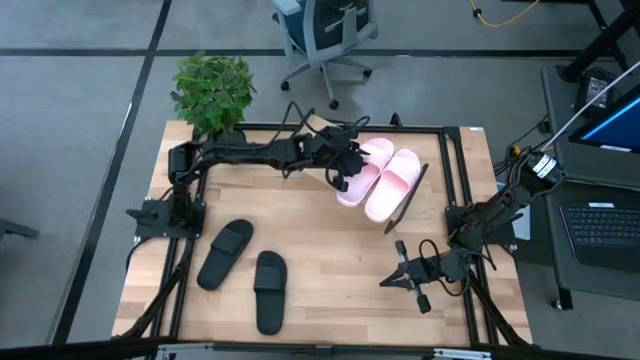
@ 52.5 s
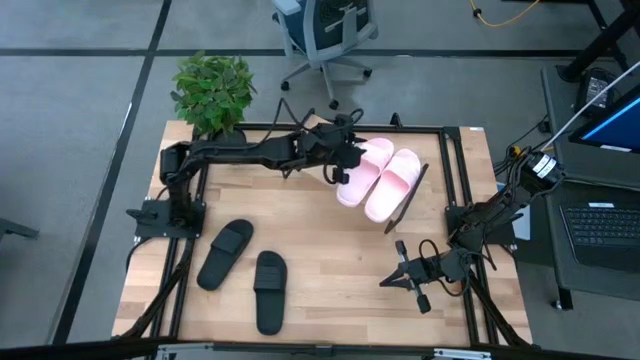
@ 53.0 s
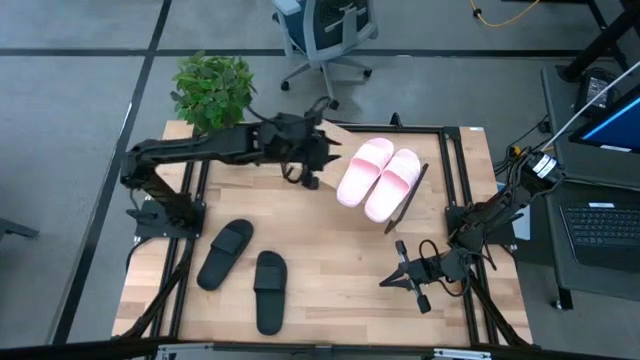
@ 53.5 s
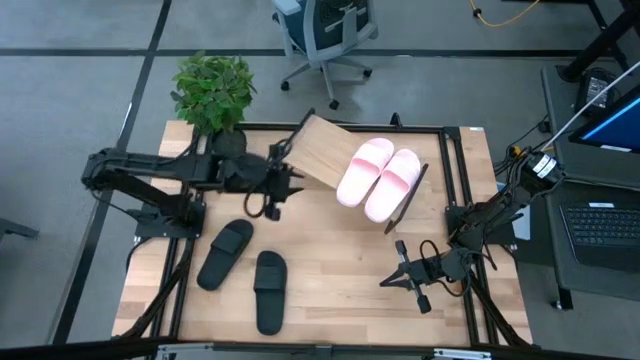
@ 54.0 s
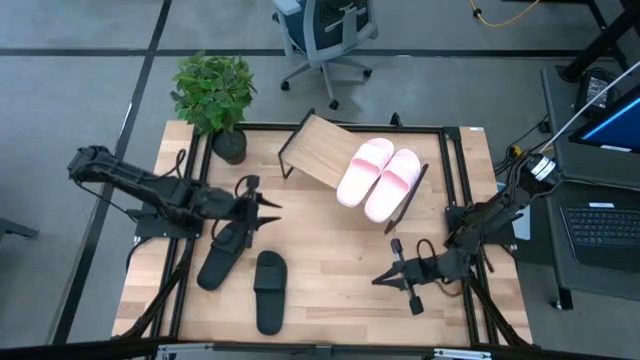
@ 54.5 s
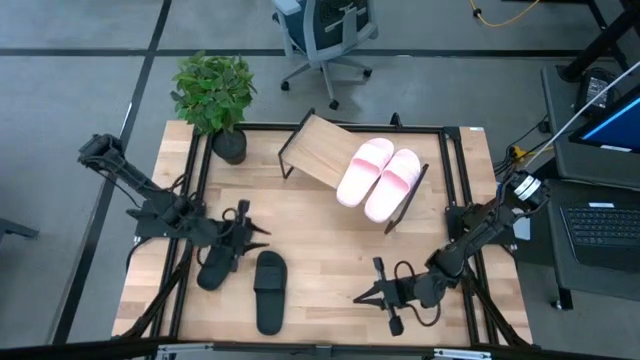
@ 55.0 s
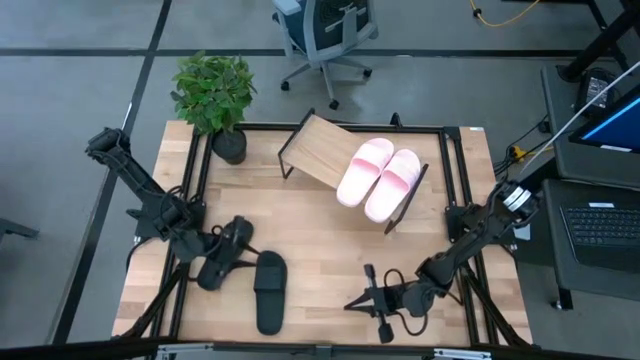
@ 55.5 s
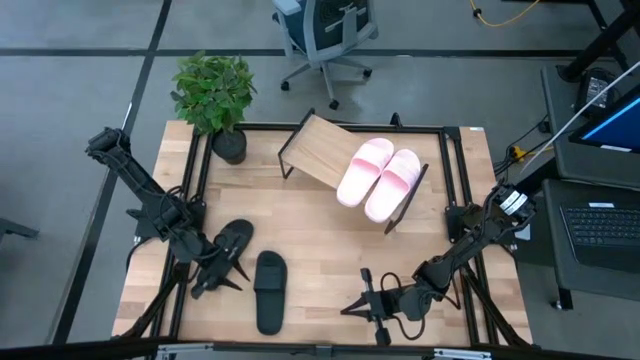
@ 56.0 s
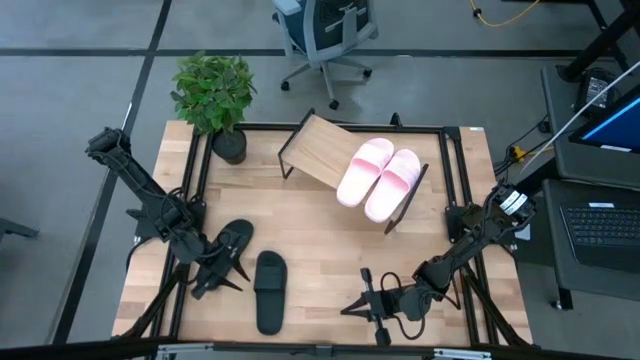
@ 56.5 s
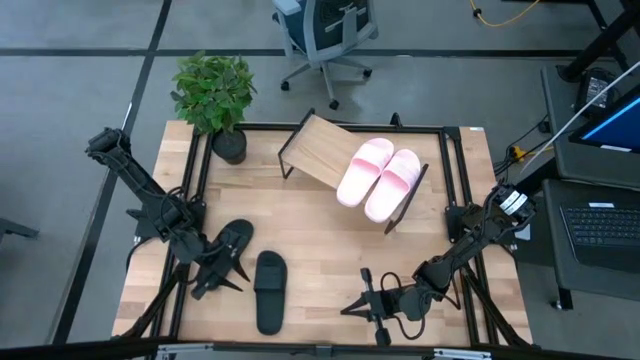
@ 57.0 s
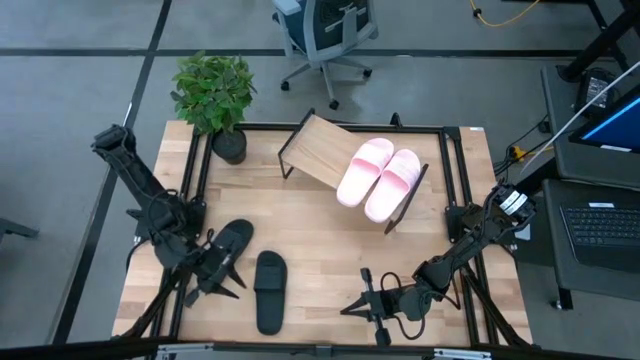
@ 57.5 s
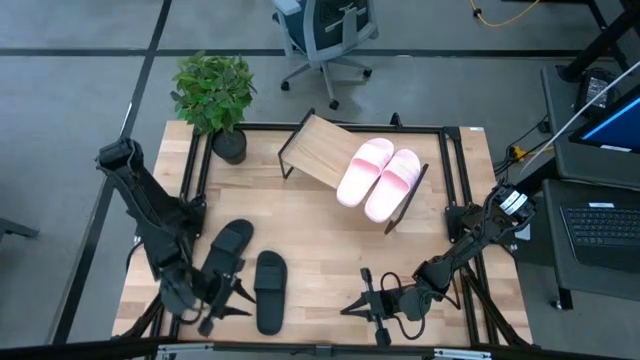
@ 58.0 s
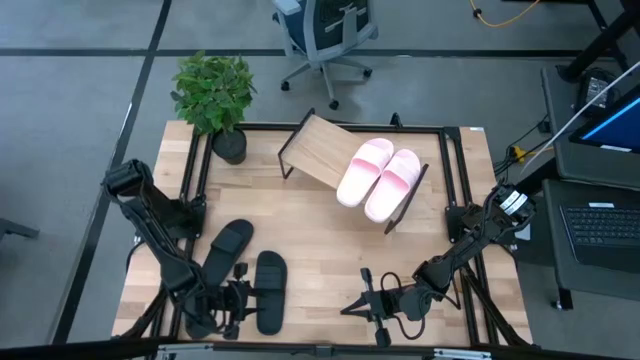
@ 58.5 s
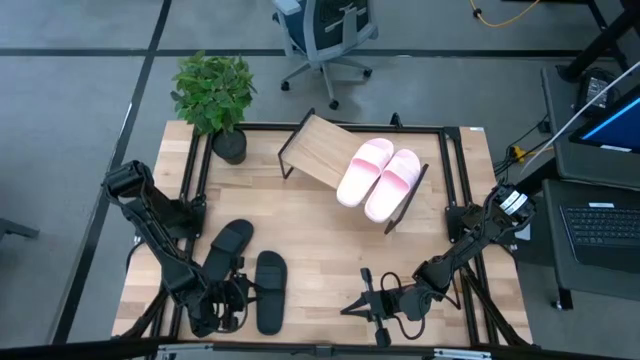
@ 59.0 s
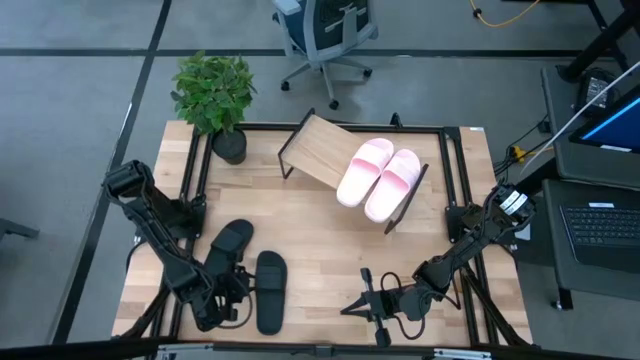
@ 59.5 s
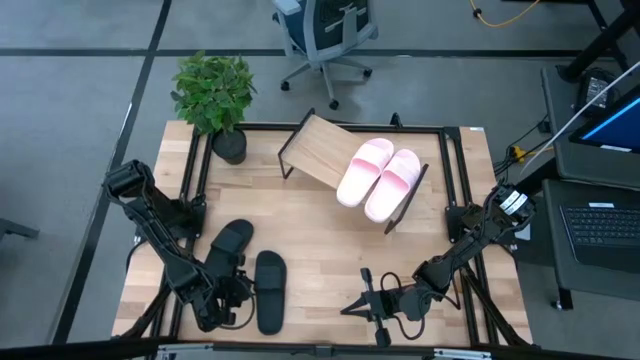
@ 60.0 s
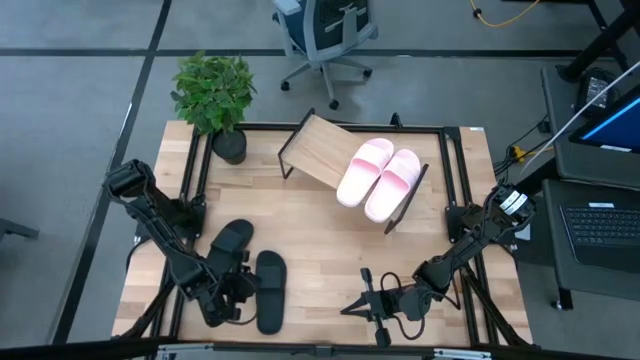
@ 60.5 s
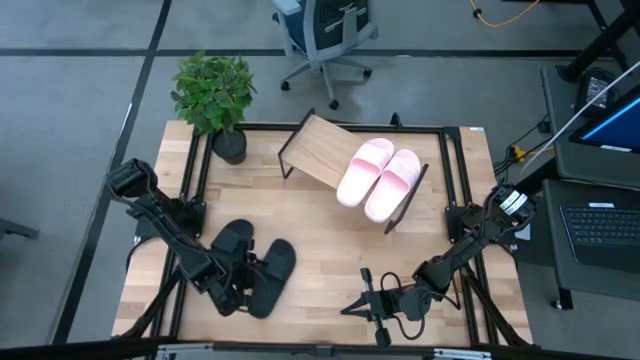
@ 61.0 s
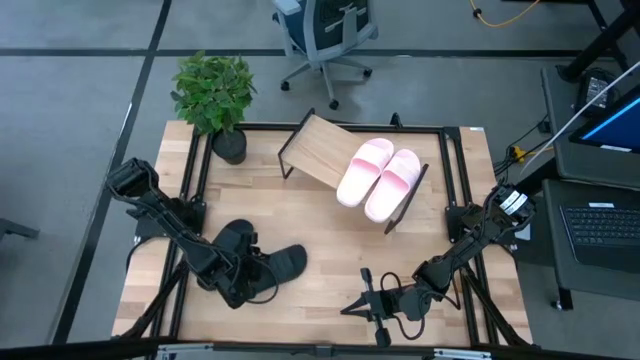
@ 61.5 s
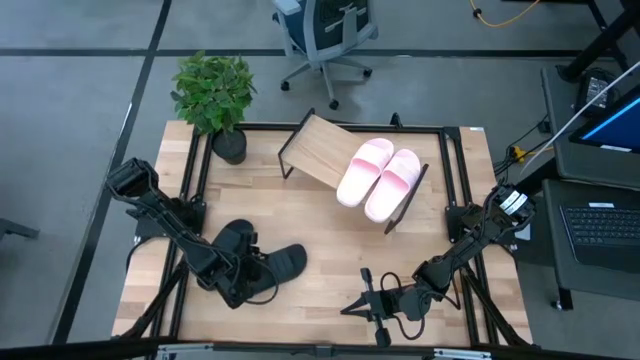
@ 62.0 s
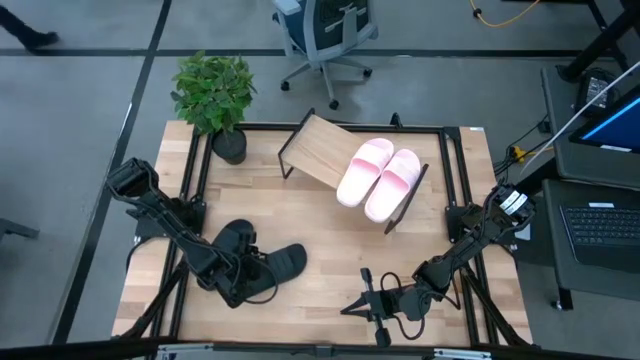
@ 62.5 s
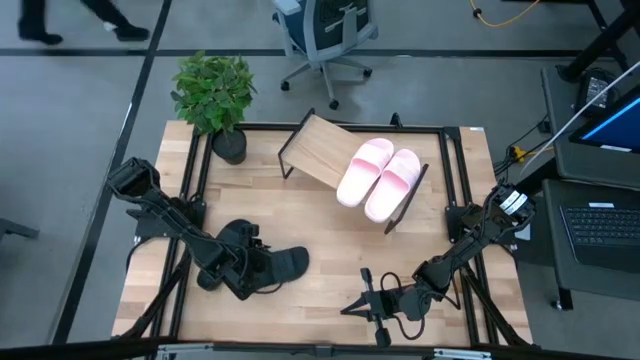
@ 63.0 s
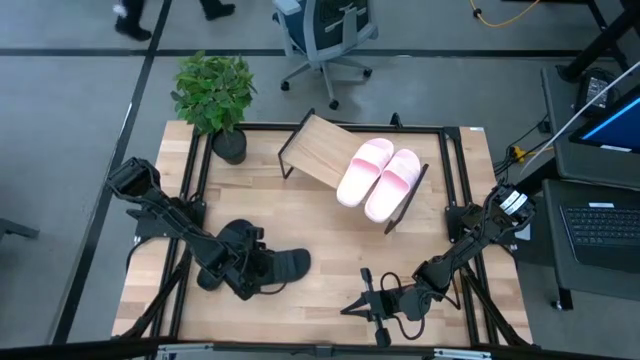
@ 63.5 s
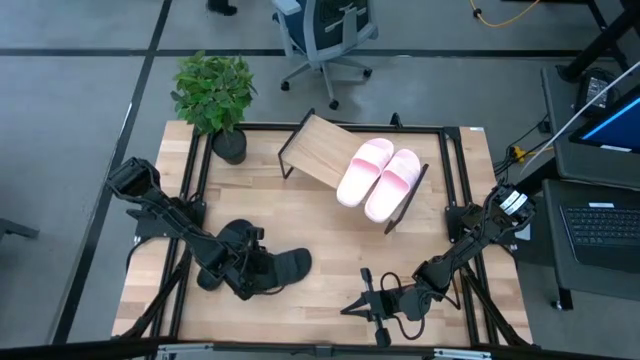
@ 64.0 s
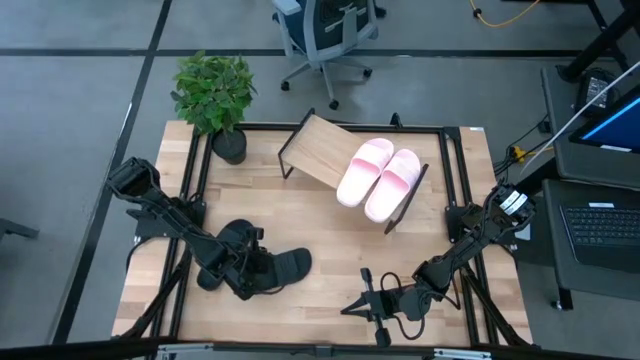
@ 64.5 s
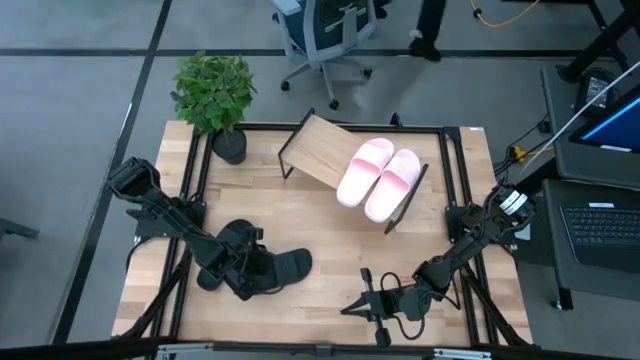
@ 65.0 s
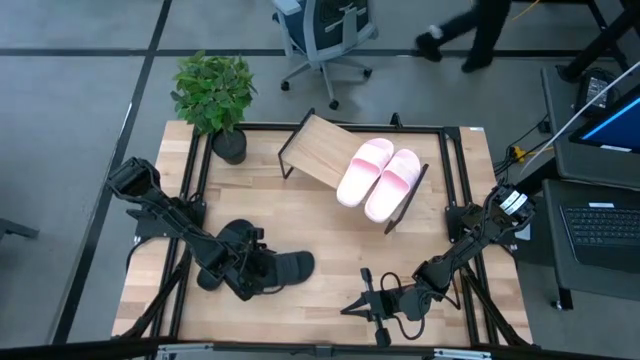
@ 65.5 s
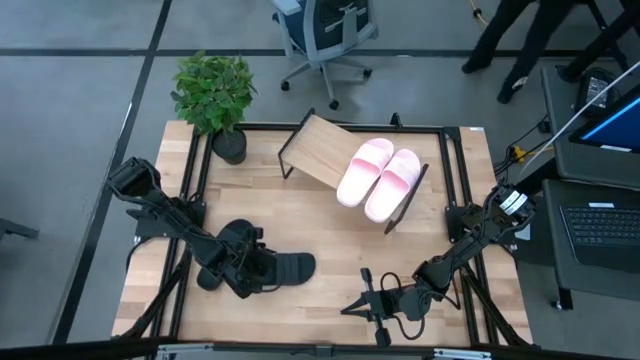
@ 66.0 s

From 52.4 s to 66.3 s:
Task: Pick and place slides into the shelf
Put the right black slide on the shelf

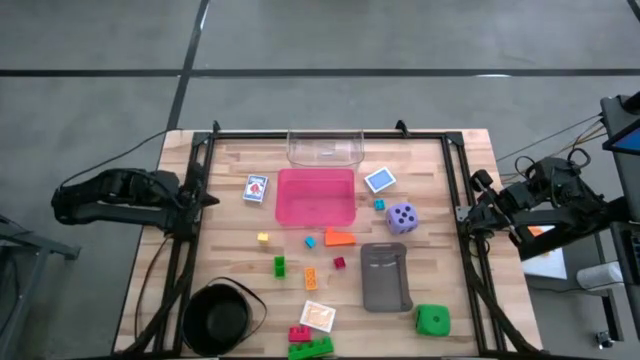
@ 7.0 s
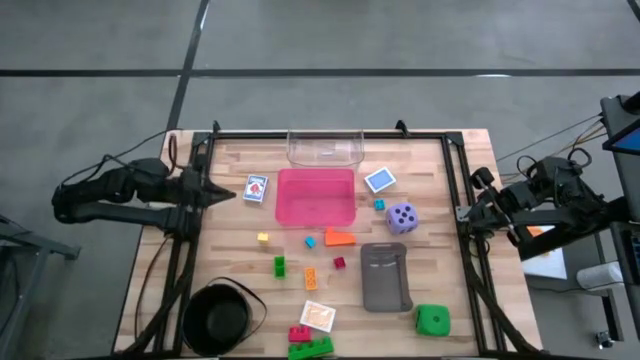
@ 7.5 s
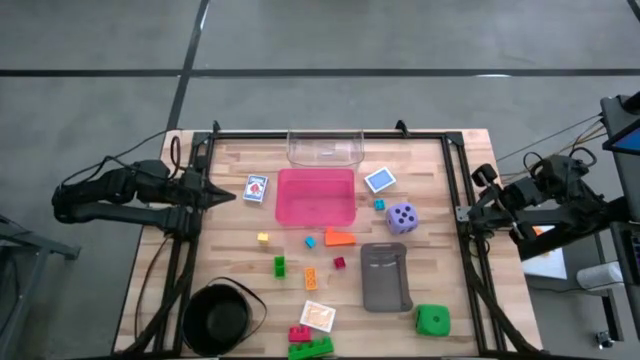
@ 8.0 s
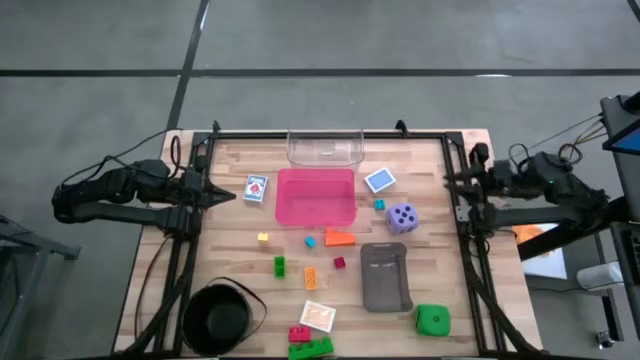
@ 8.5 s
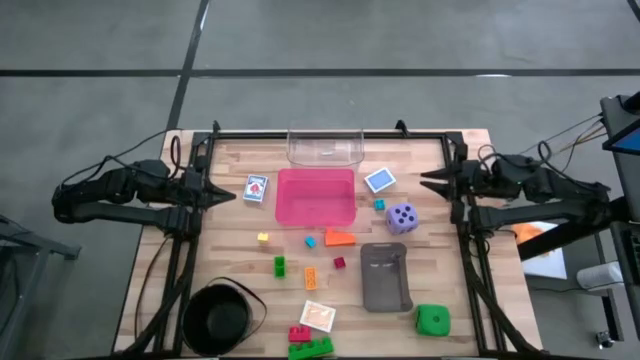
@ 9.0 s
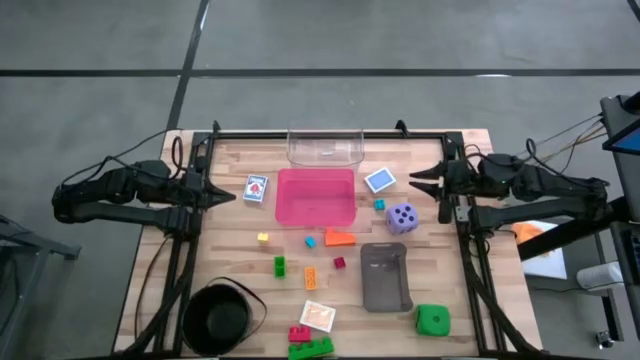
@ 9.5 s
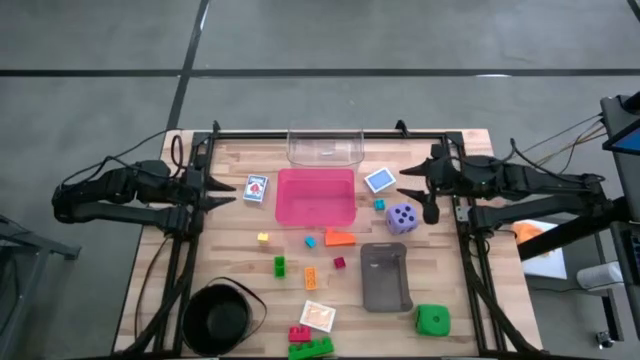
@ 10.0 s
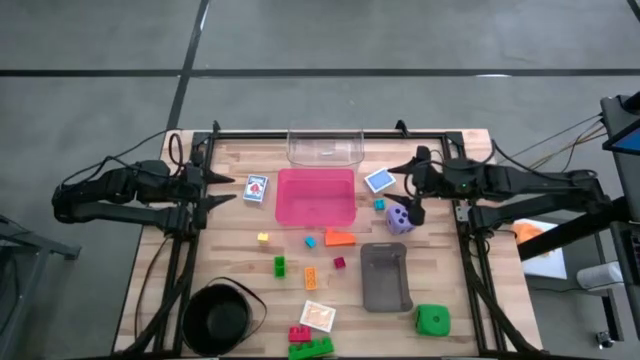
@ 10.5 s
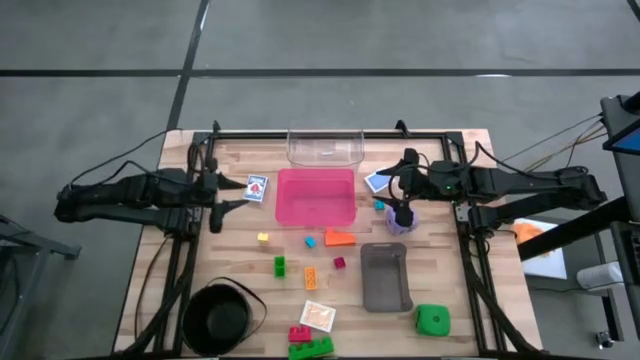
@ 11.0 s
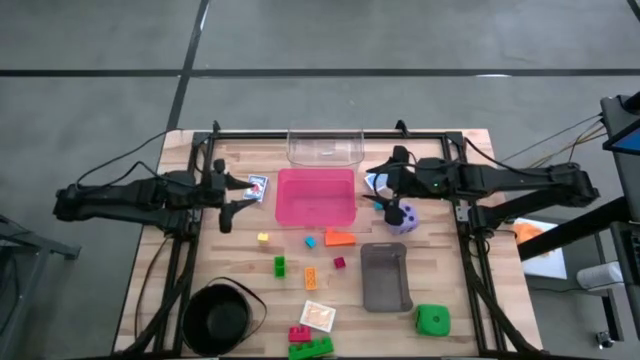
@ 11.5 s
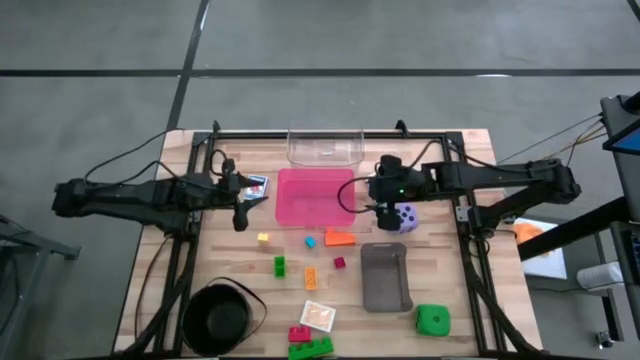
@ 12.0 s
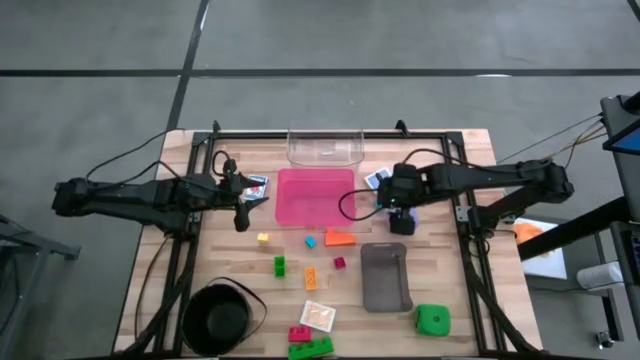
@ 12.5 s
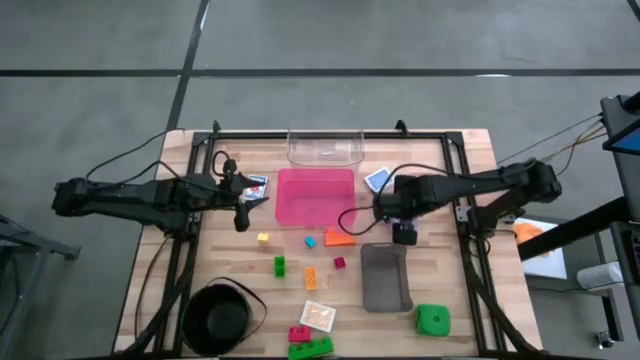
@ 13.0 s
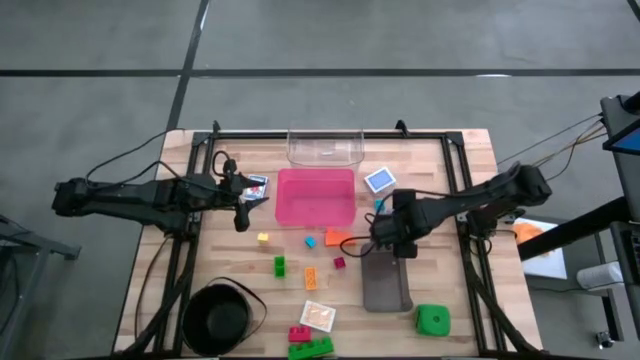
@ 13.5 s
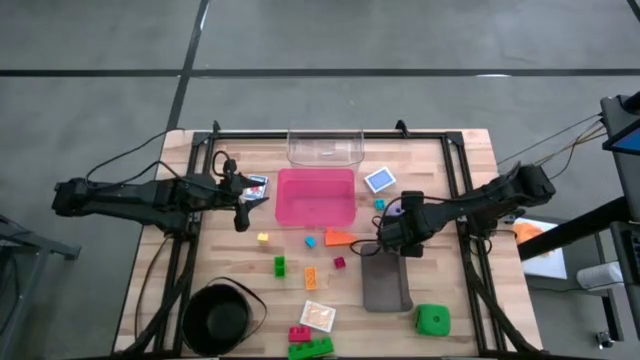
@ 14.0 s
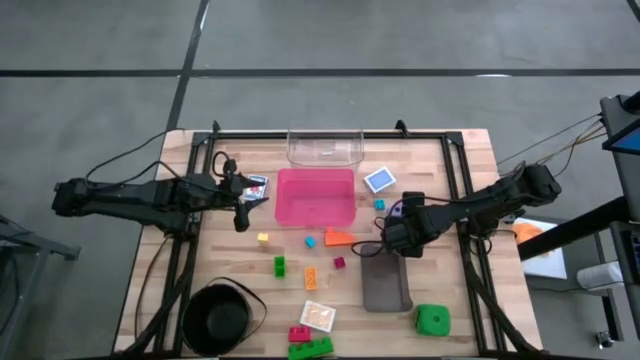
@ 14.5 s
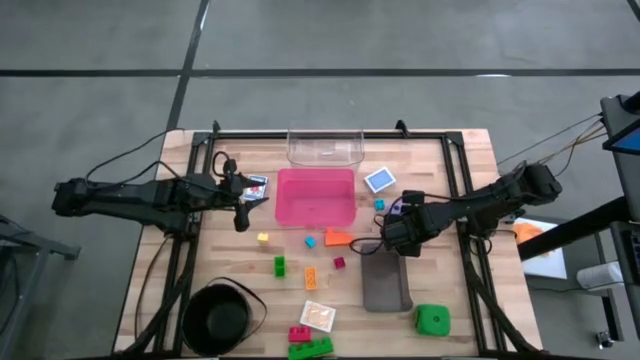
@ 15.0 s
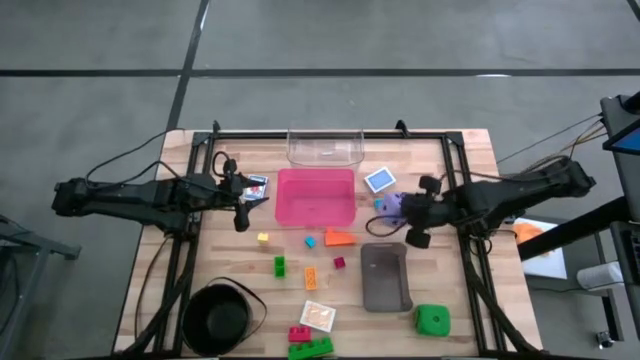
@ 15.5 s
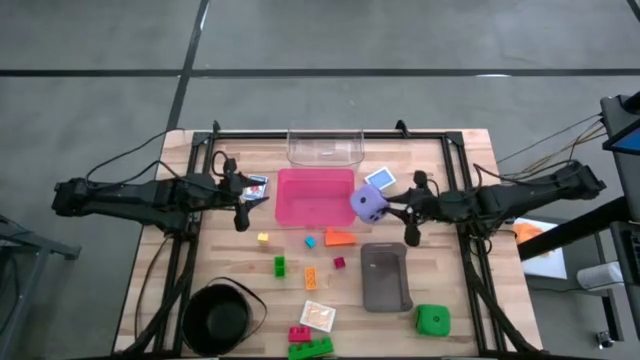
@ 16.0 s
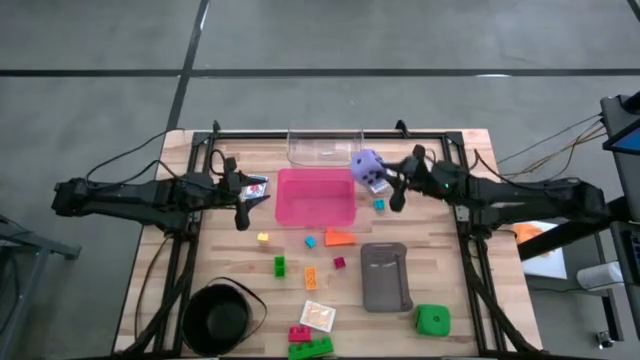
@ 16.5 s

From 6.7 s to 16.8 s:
Task: Pick & Place Toys
Put the purple dice into the transparent bin
